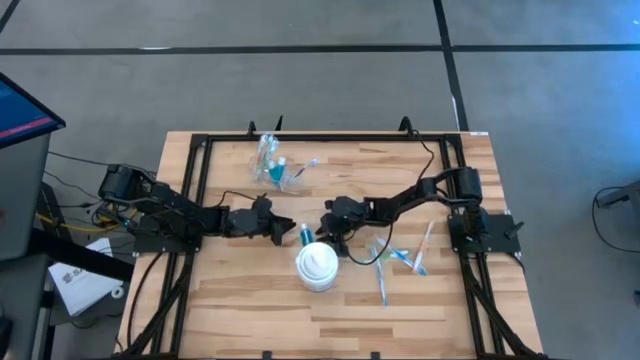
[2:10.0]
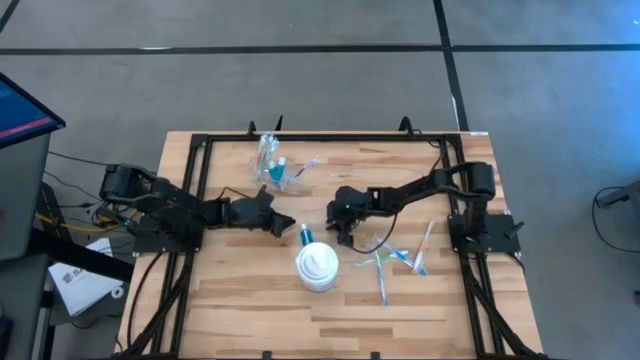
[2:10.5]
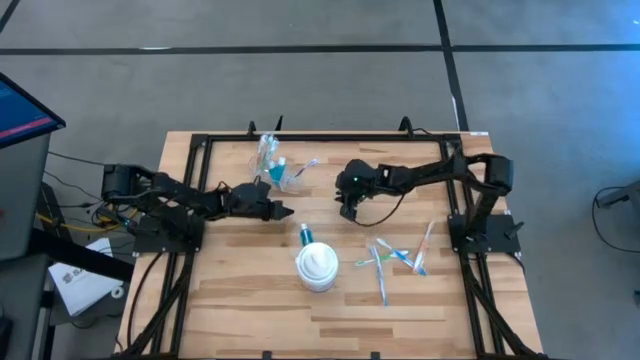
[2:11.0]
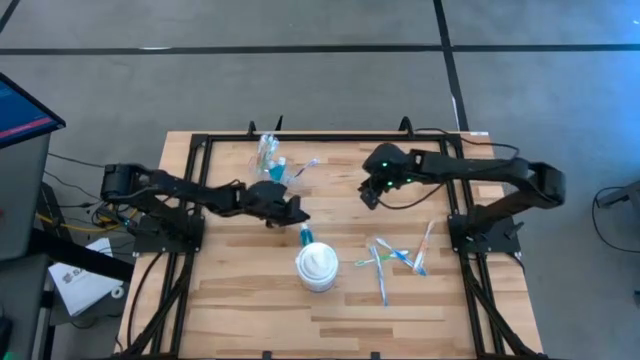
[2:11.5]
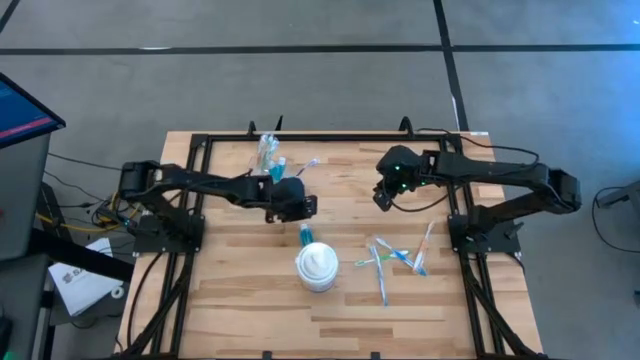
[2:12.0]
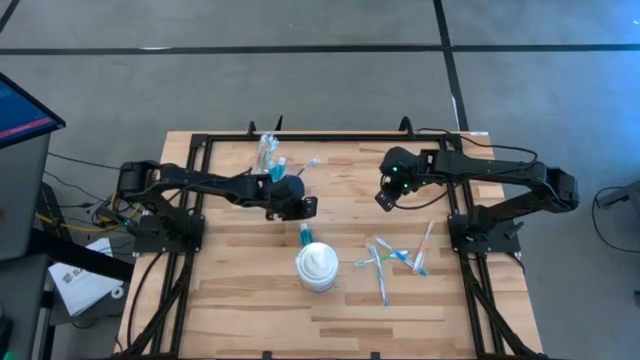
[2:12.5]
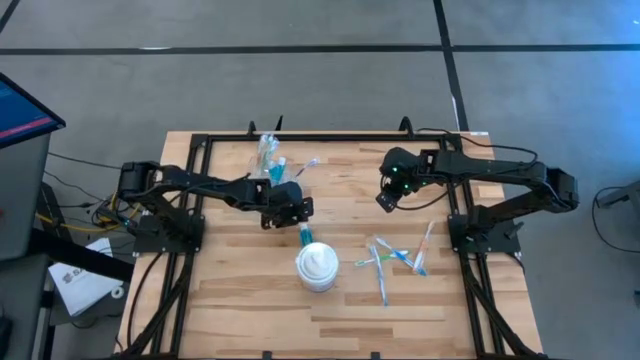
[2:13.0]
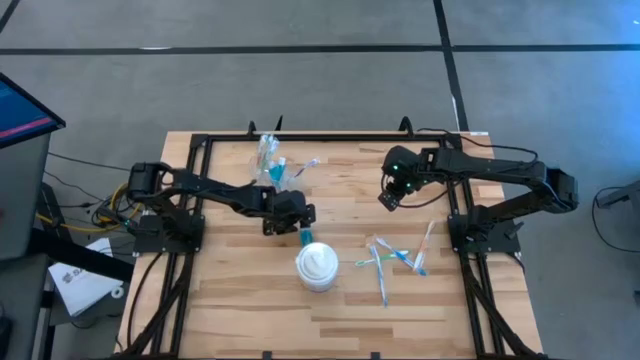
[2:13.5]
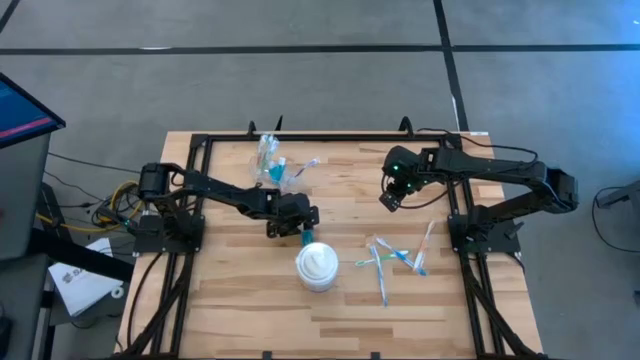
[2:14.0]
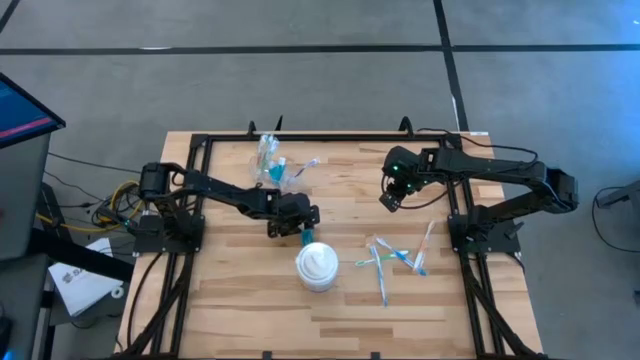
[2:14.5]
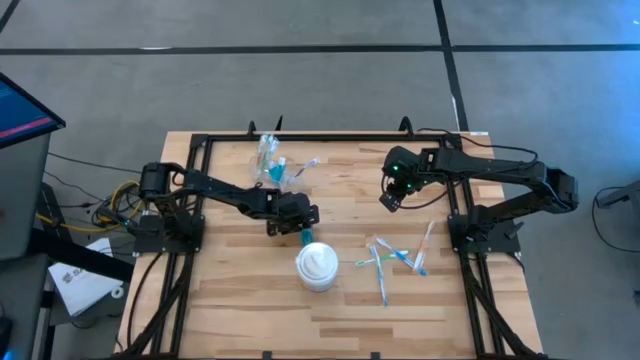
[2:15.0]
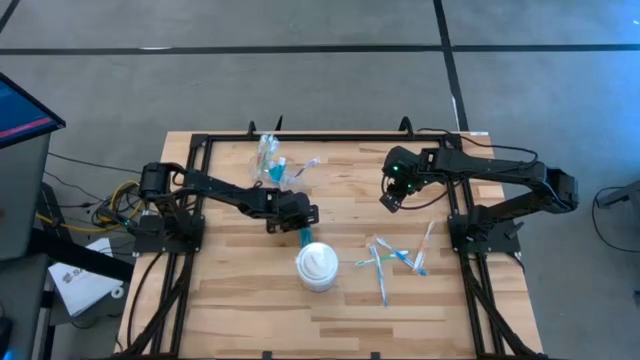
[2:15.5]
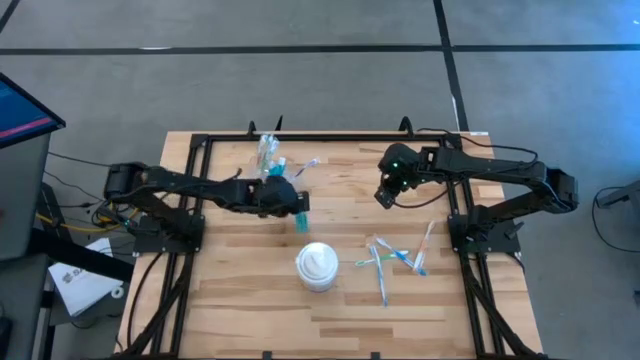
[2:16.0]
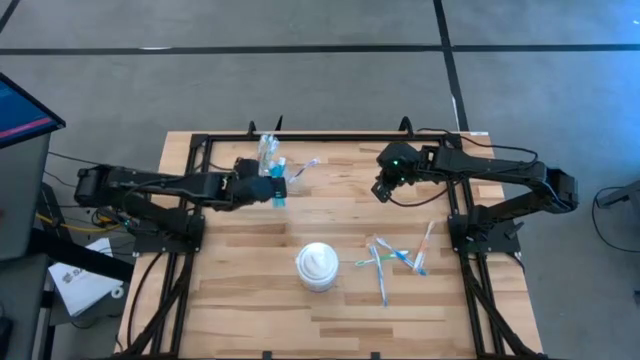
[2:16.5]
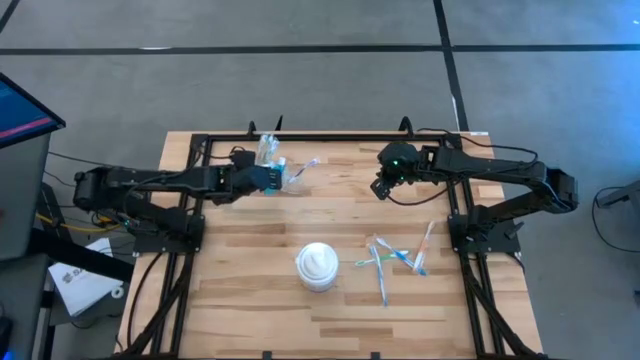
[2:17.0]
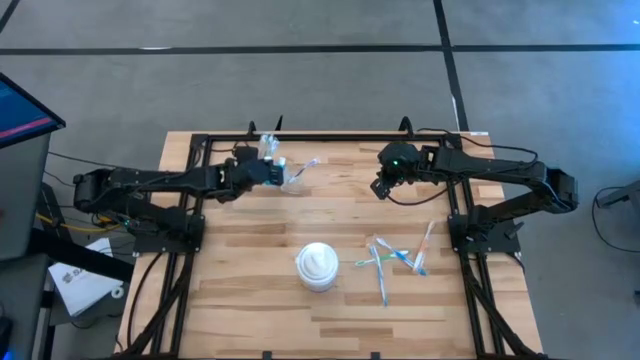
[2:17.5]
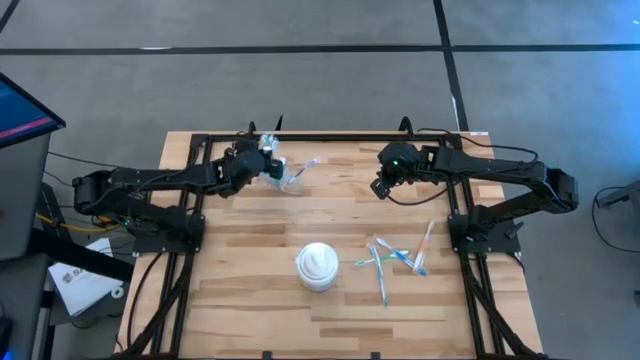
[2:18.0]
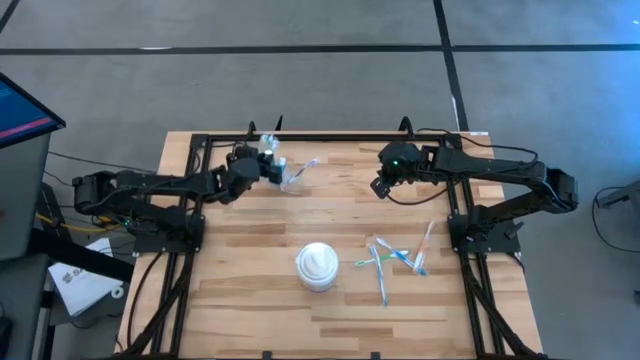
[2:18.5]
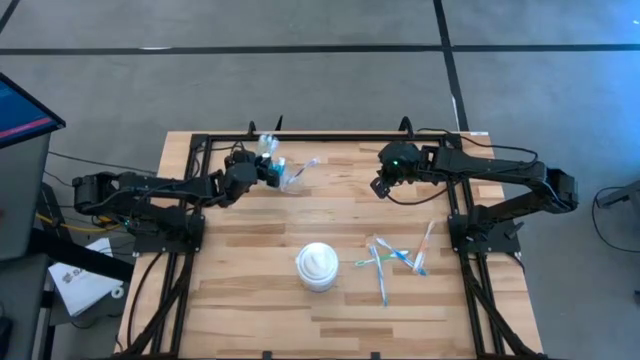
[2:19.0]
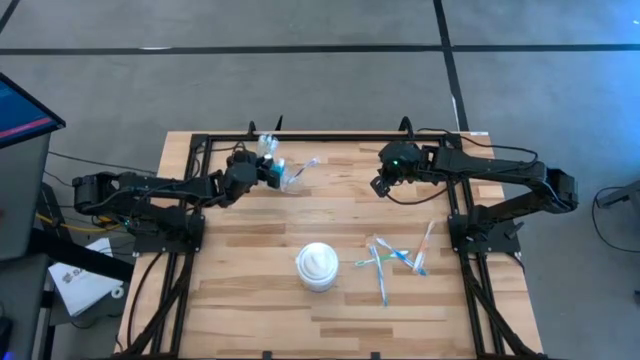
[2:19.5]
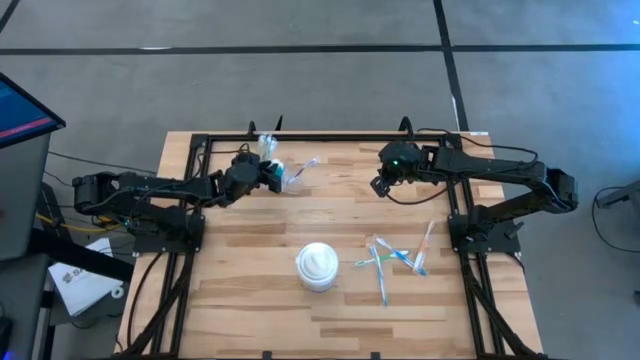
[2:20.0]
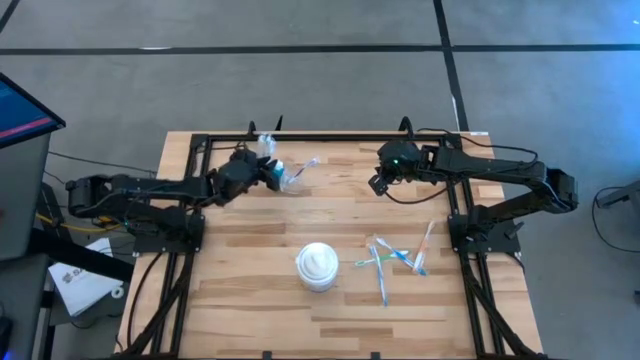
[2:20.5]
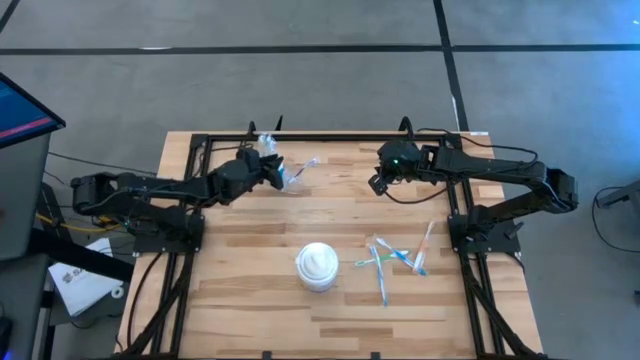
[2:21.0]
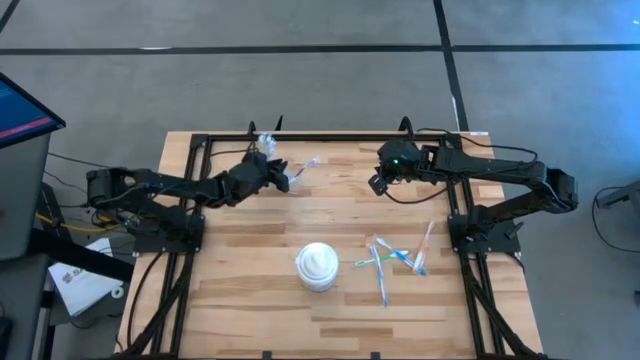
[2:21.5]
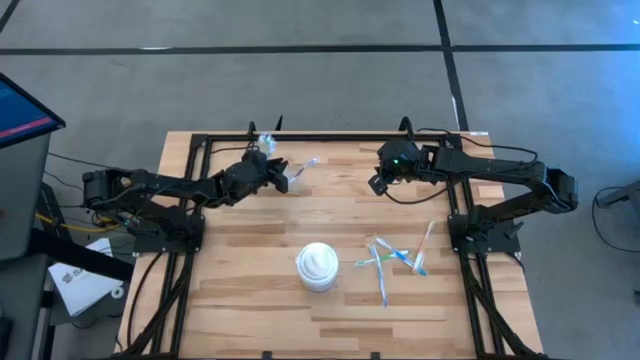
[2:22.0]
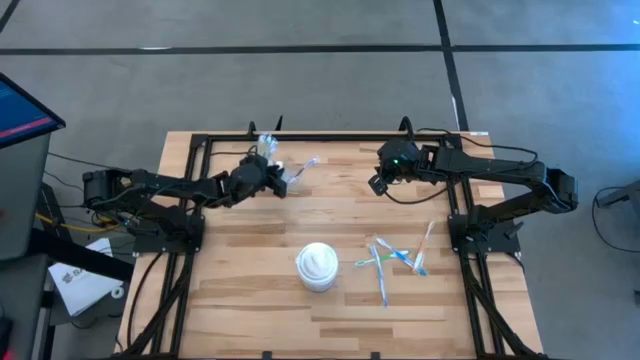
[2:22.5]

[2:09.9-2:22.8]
Task: Pick & Place toothbrushing station
Put the blue mouthwash into the transparent organizer

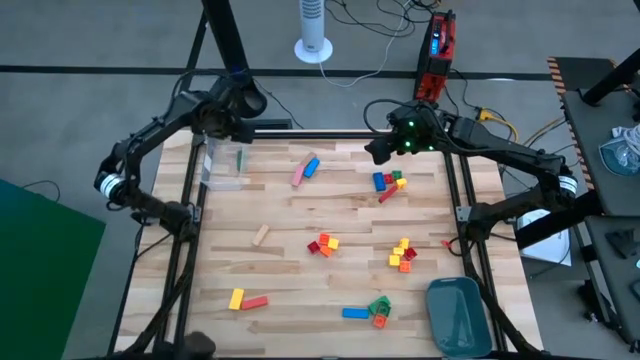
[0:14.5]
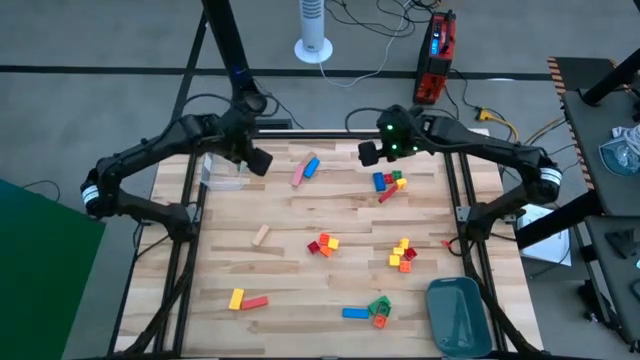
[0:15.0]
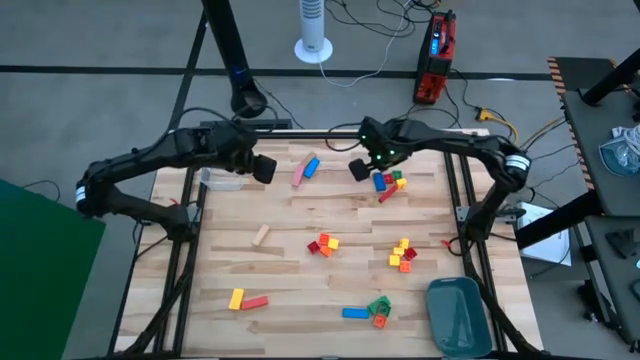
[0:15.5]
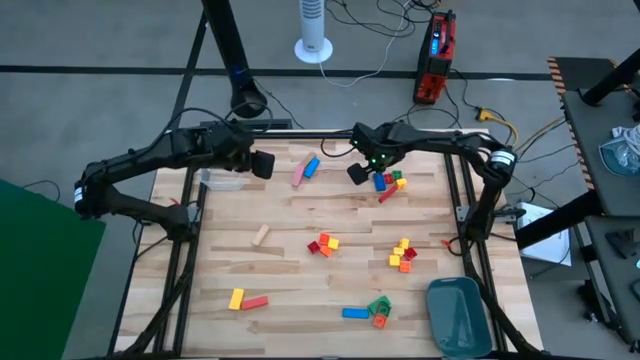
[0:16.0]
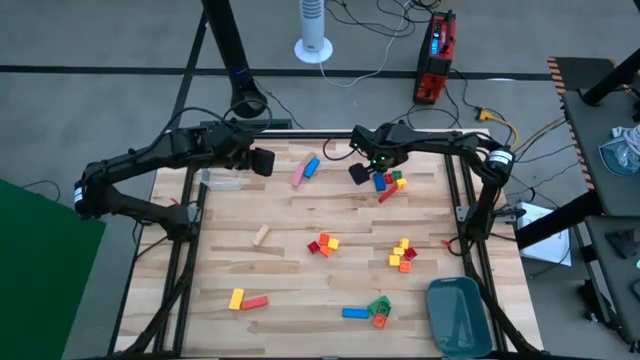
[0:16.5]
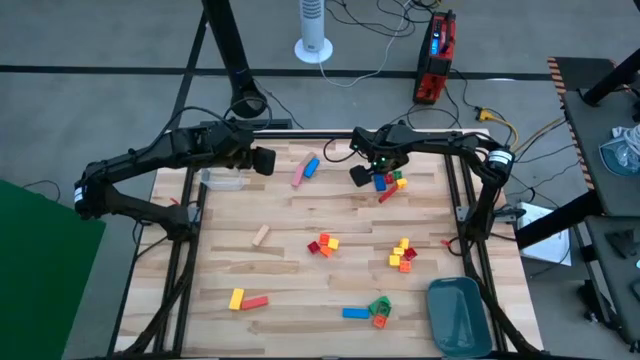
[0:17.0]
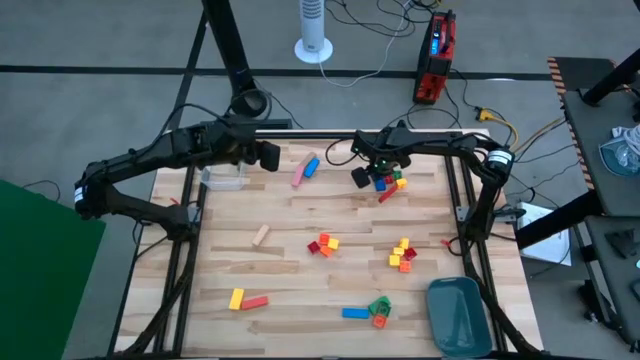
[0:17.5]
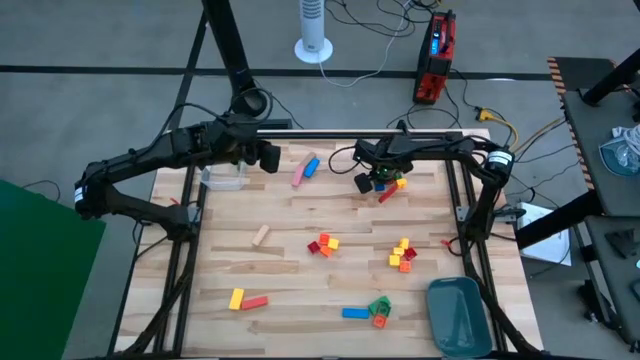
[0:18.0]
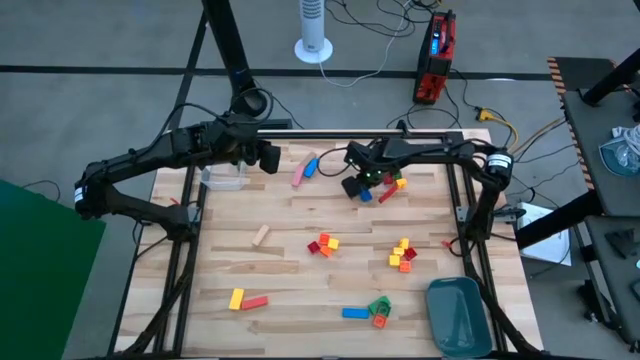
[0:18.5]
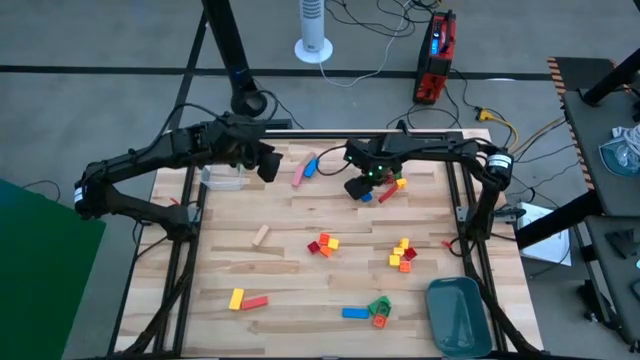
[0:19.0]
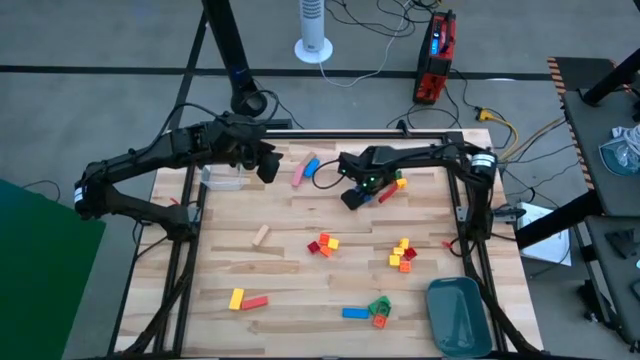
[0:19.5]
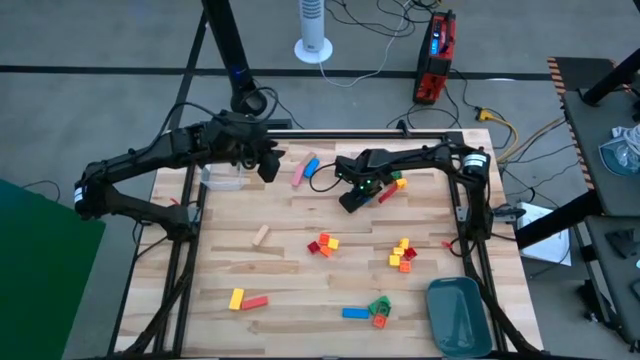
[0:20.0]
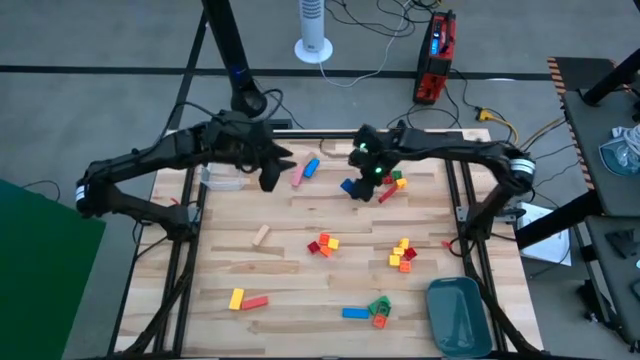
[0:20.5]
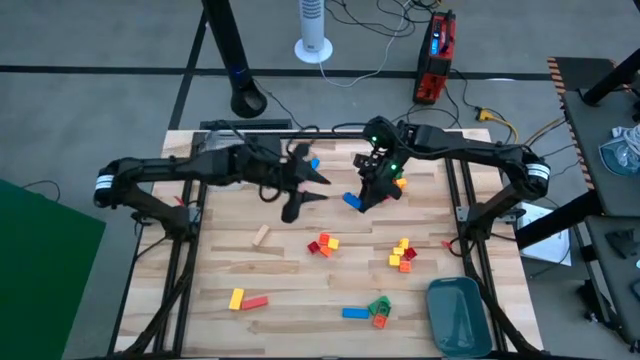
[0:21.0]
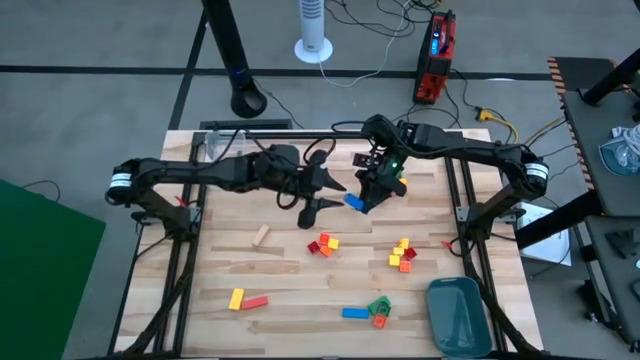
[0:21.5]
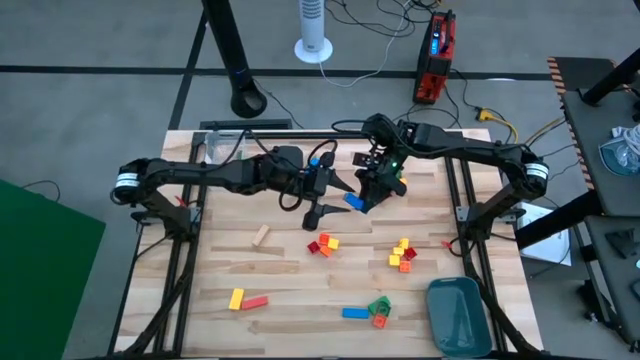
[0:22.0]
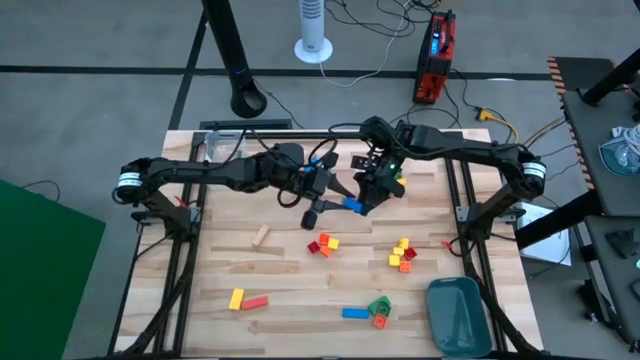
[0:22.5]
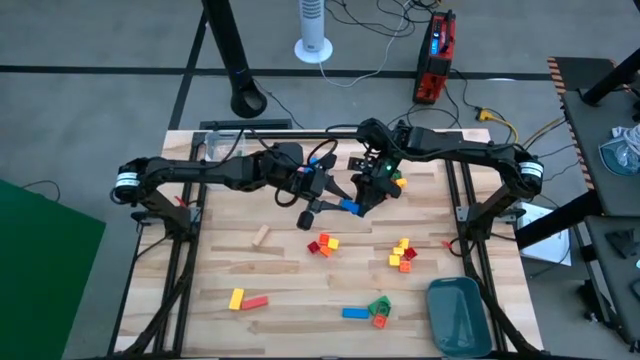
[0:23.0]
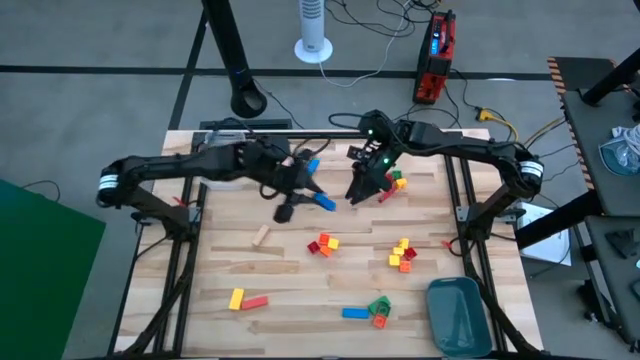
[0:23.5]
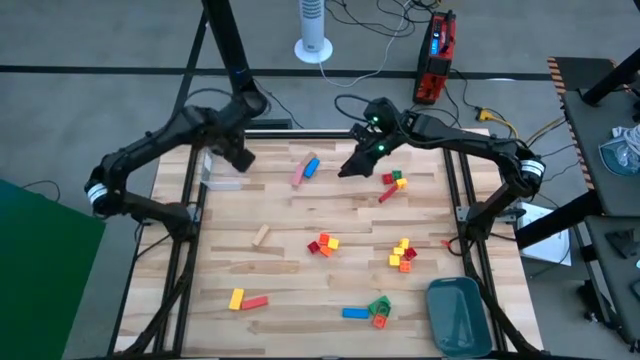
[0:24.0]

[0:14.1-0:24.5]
Task: Sort blocks by size
Put the blue rectangular game piece into the transparent bin
